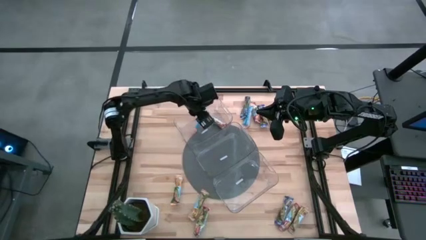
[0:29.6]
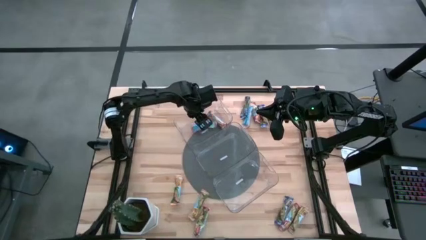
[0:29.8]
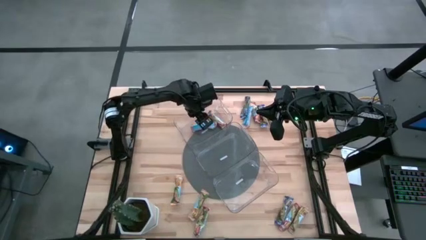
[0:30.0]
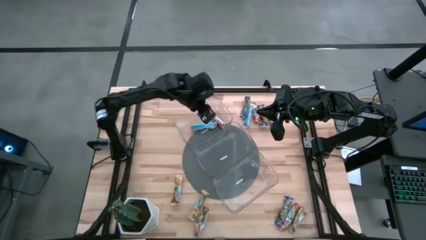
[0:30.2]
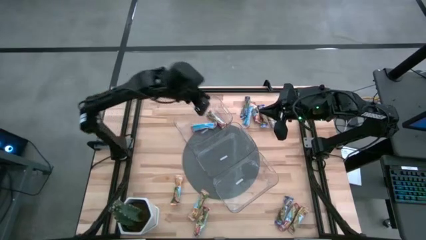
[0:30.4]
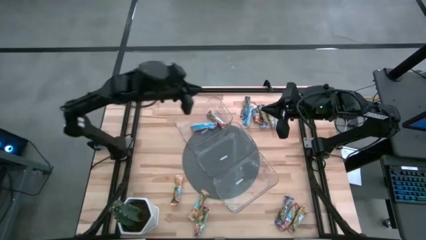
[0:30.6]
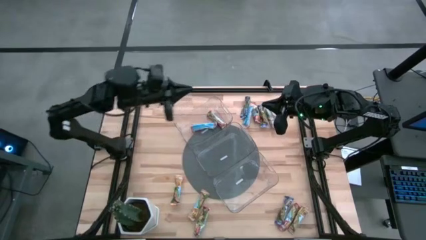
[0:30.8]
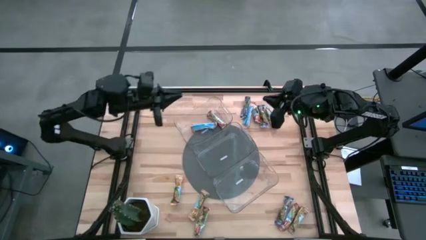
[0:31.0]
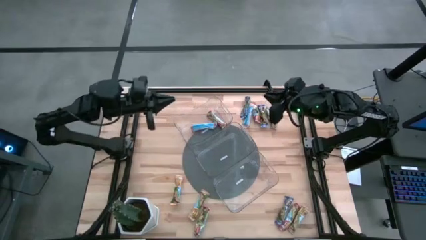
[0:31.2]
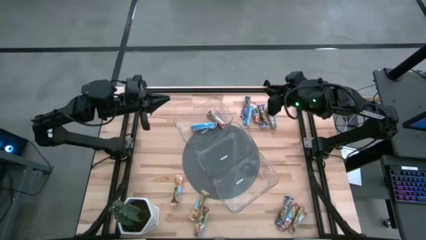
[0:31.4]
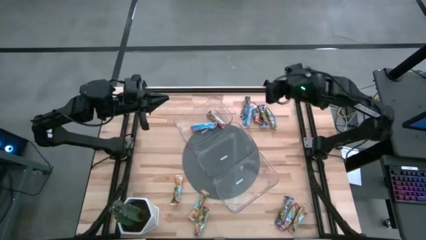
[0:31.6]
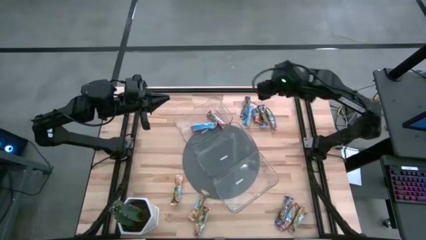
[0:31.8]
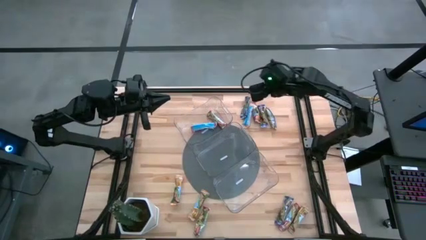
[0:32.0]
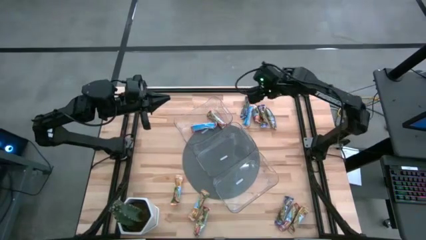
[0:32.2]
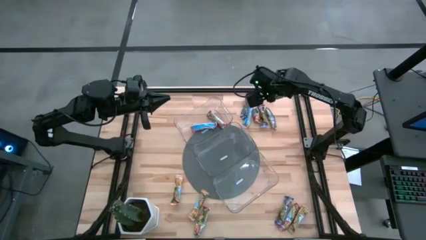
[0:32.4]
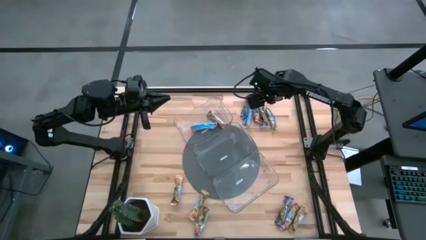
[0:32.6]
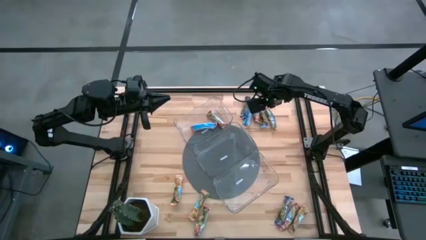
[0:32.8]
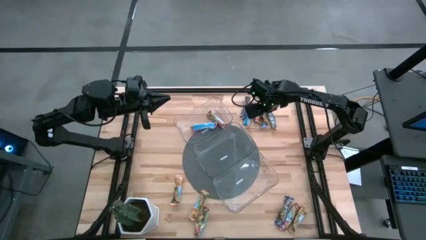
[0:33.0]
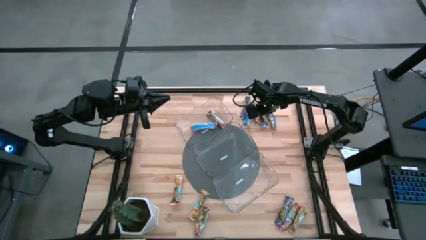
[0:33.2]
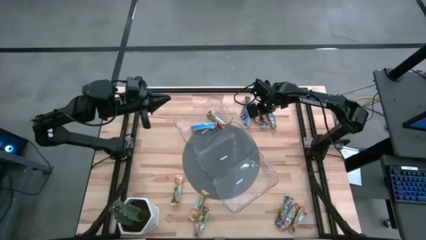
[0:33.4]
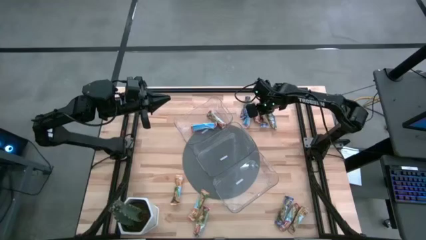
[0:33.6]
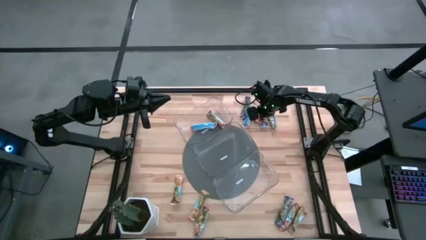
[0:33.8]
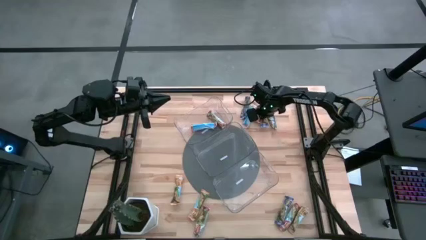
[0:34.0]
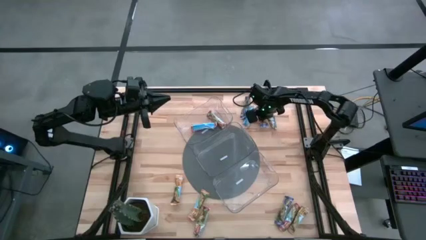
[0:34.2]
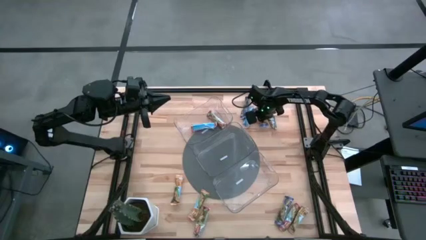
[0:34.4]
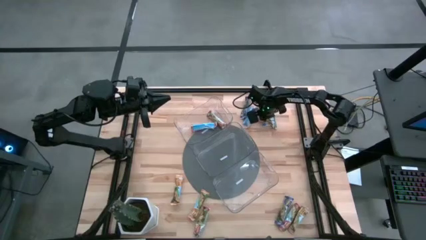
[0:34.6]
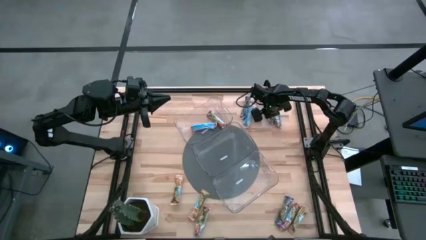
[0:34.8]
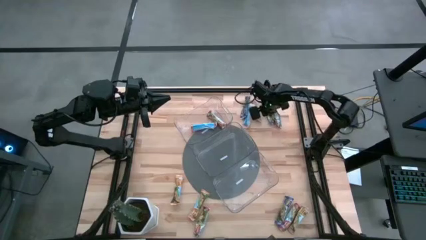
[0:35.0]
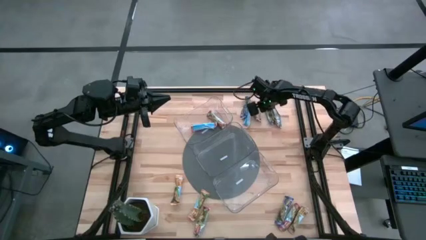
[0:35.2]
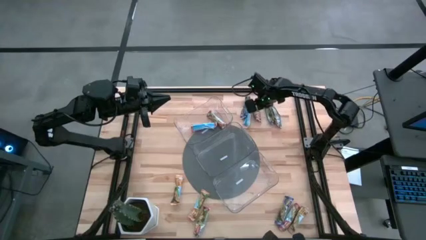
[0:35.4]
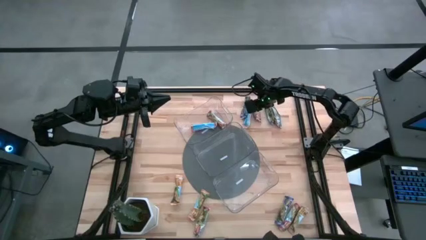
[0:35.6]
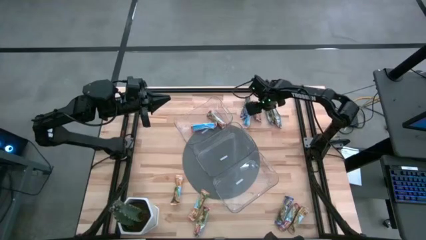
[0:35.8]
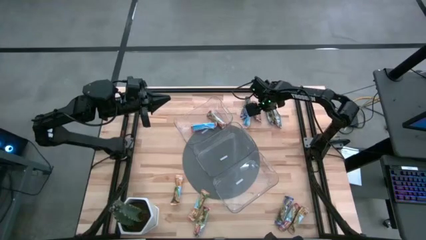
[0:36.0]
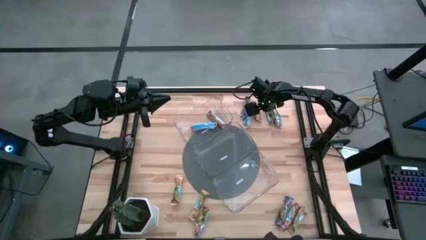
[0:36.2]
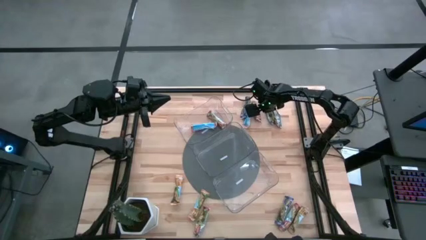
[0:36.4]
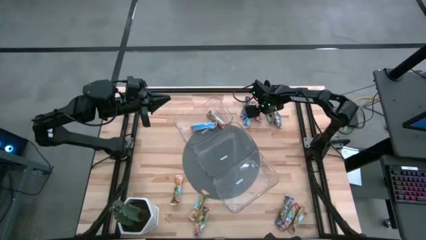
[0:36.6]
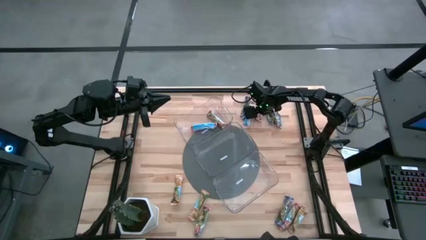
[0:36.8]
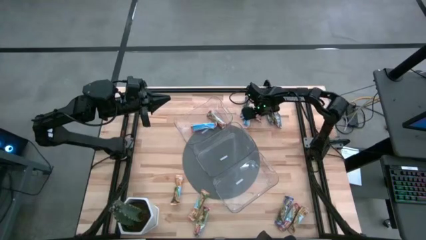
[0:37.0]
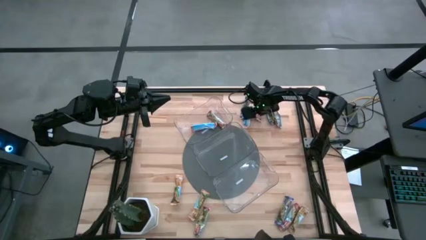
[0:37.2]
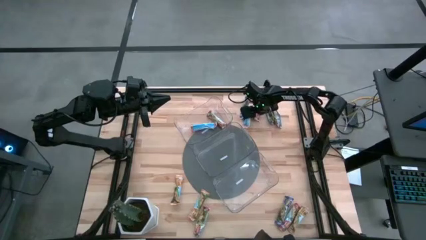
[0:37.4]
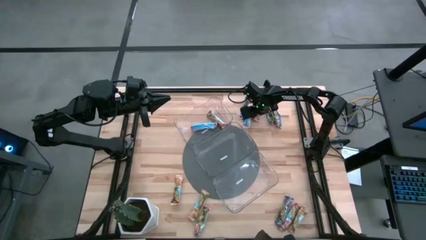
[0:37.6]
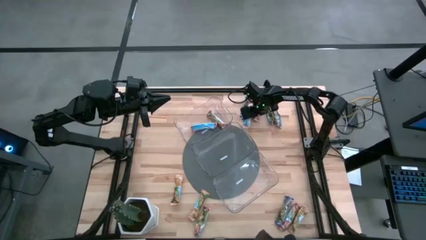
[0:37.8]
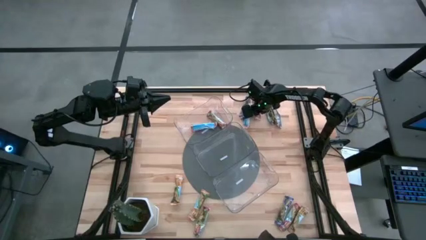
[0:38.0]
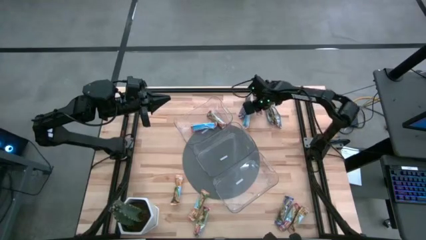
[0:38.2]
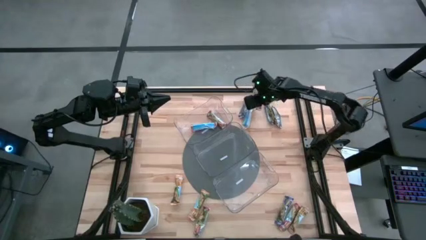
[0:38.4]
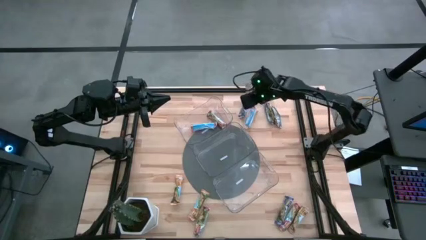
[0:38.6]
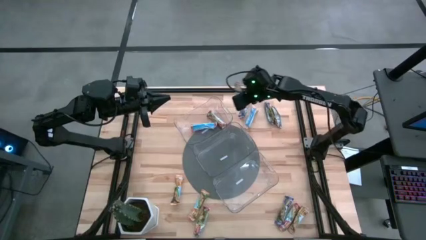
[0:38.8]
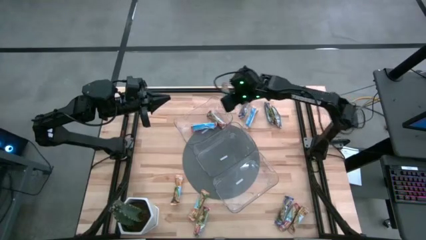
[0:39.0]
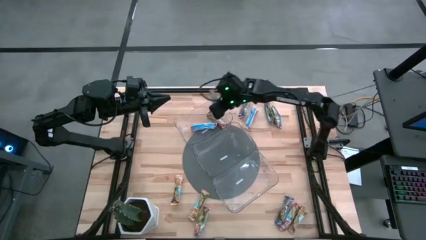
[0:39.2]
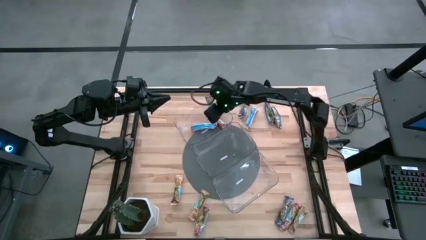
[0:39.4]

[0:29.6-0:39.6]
Task: Pick and place Granola Bars by type
Put the red granola bar into the top transparent bin
